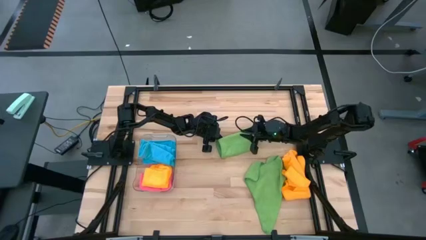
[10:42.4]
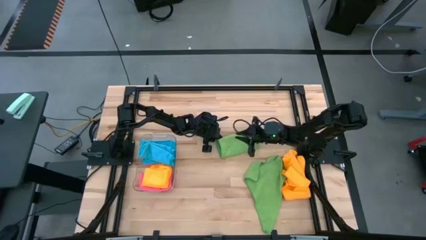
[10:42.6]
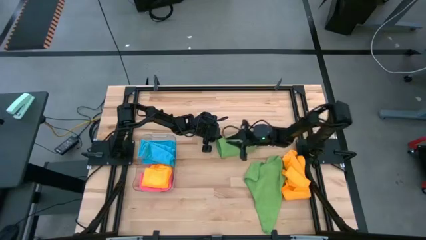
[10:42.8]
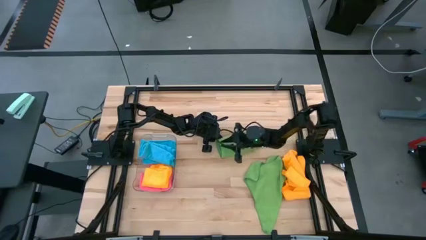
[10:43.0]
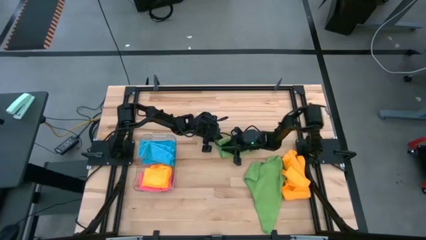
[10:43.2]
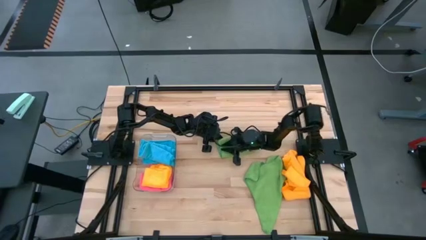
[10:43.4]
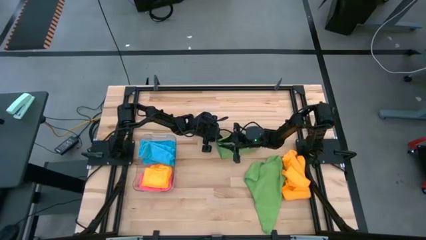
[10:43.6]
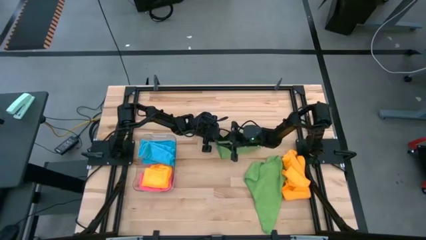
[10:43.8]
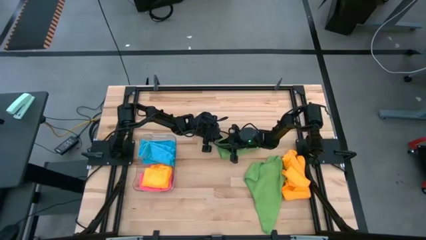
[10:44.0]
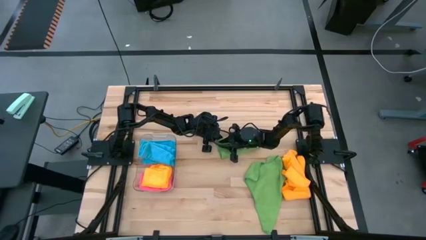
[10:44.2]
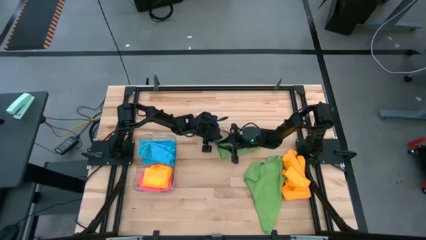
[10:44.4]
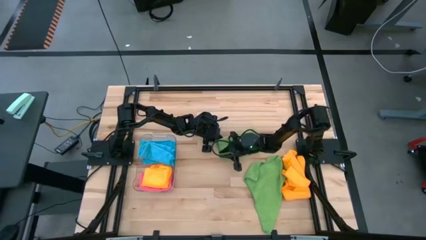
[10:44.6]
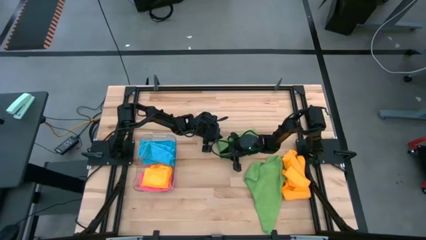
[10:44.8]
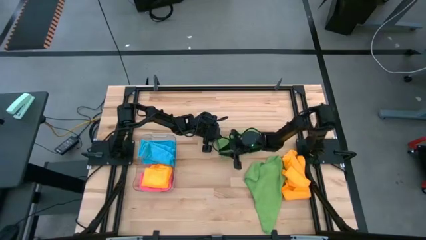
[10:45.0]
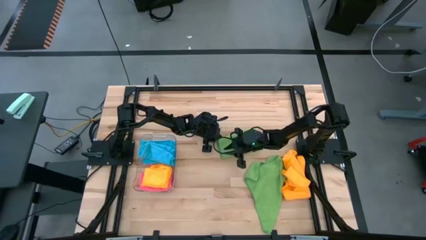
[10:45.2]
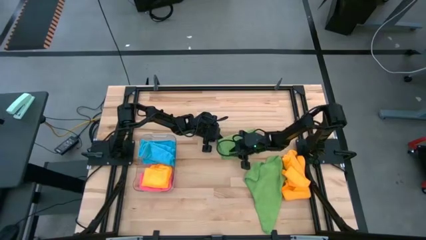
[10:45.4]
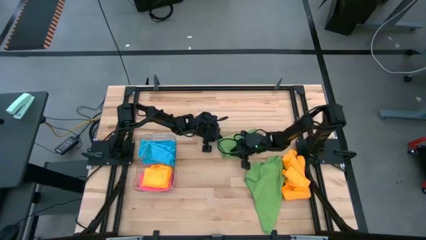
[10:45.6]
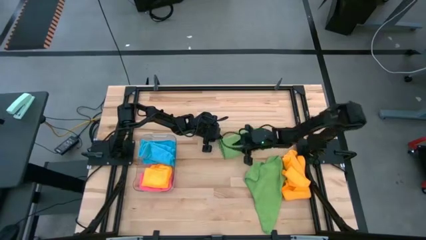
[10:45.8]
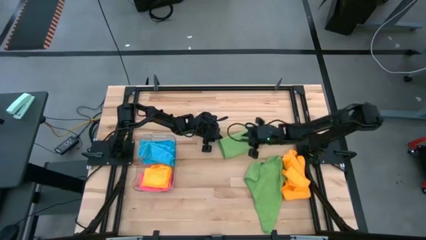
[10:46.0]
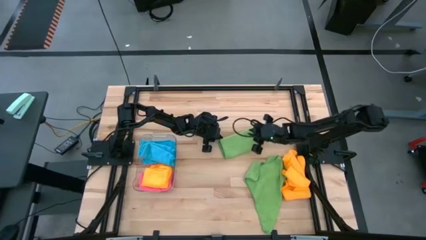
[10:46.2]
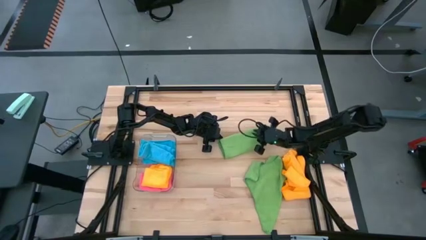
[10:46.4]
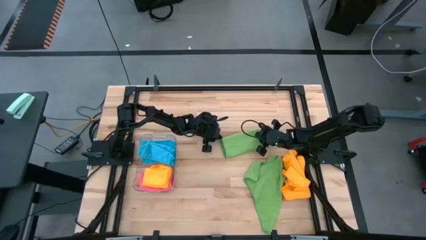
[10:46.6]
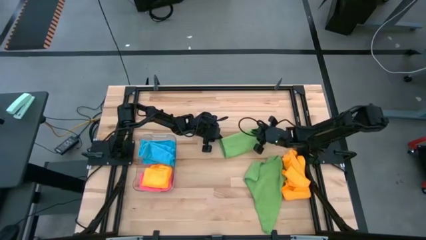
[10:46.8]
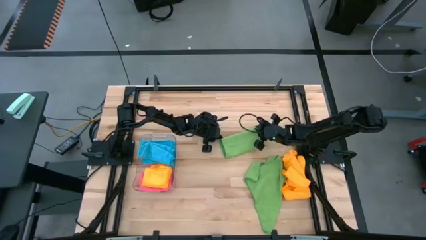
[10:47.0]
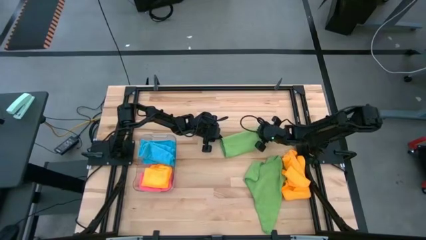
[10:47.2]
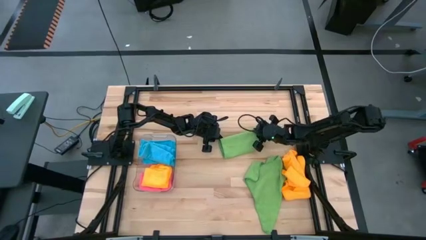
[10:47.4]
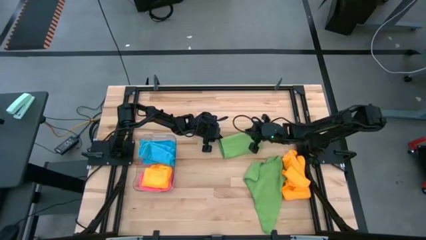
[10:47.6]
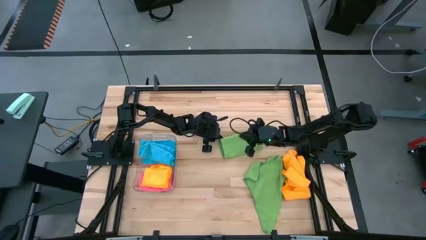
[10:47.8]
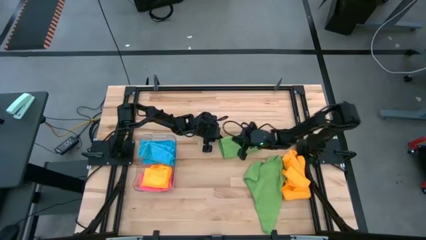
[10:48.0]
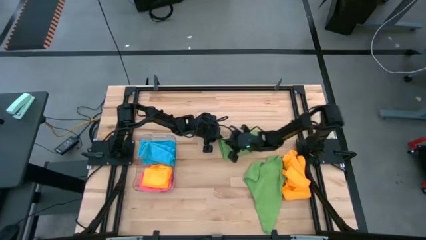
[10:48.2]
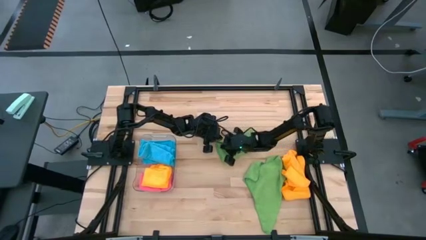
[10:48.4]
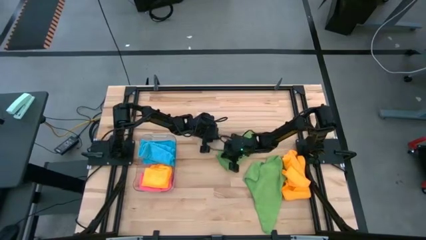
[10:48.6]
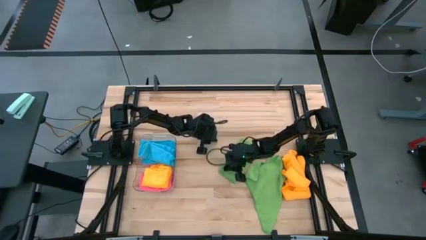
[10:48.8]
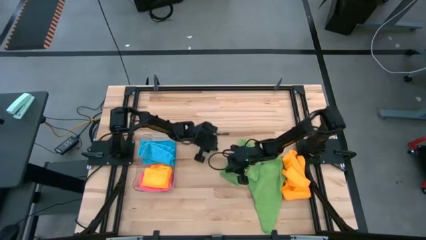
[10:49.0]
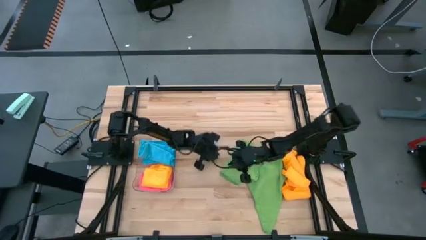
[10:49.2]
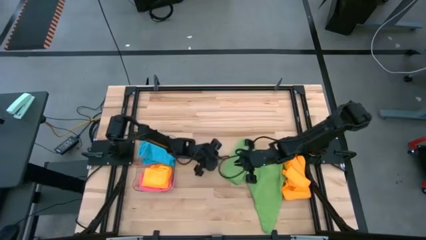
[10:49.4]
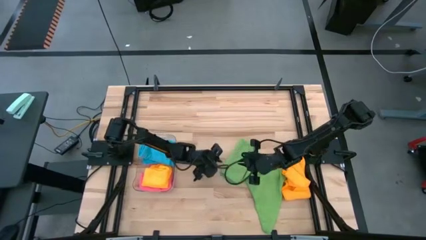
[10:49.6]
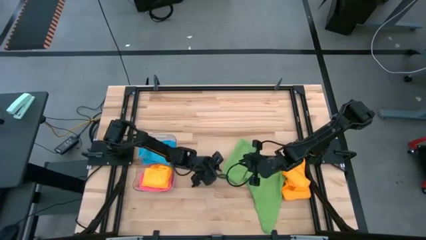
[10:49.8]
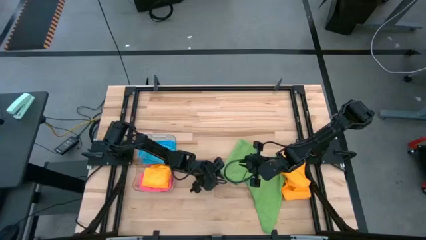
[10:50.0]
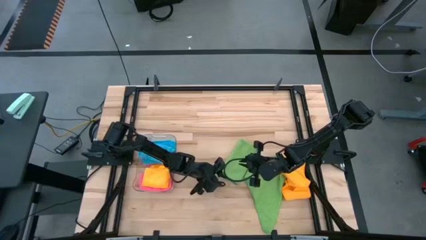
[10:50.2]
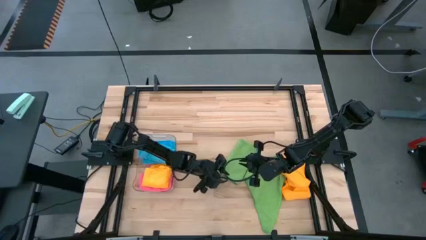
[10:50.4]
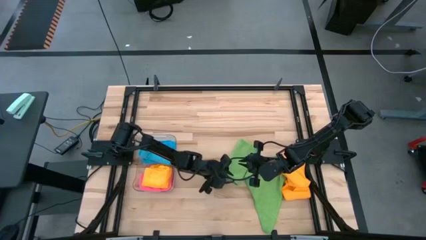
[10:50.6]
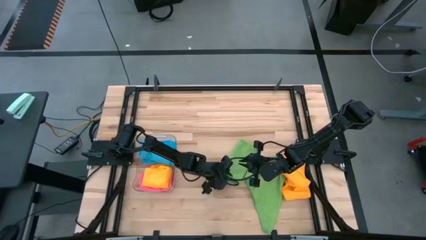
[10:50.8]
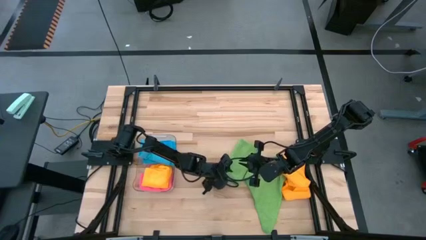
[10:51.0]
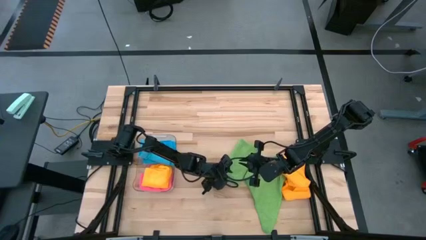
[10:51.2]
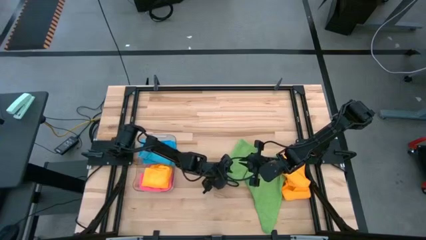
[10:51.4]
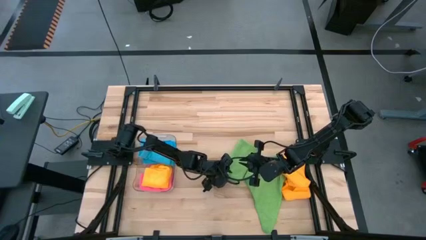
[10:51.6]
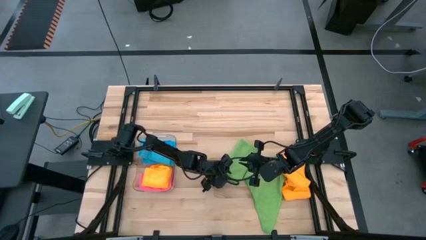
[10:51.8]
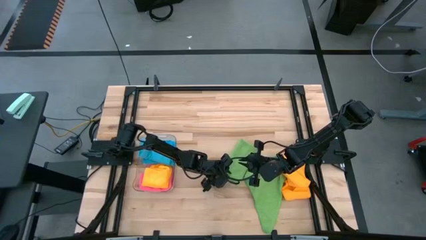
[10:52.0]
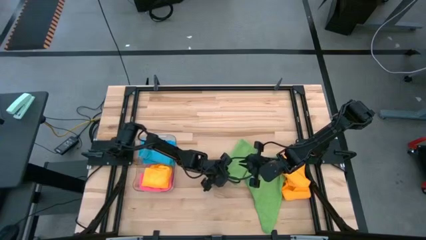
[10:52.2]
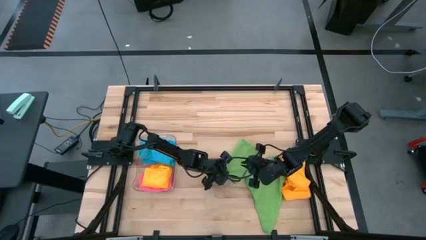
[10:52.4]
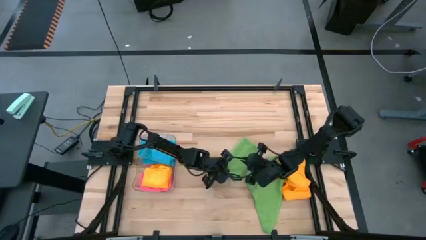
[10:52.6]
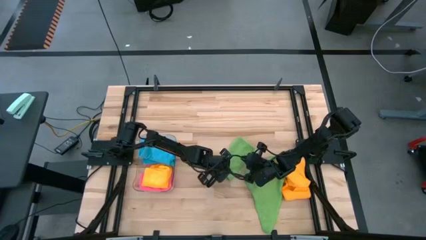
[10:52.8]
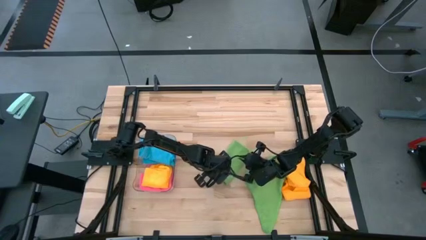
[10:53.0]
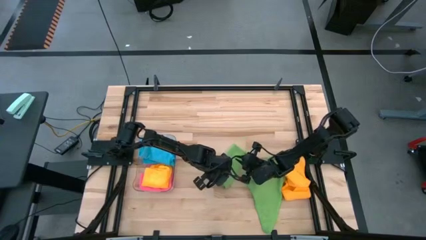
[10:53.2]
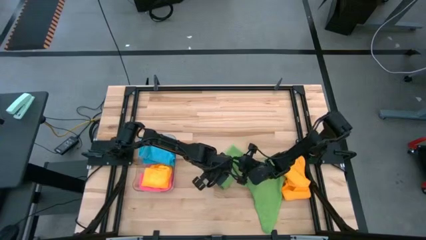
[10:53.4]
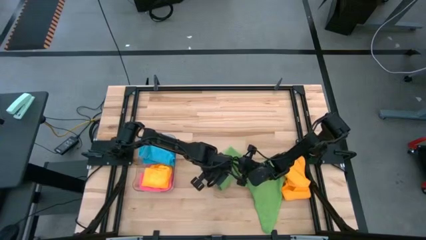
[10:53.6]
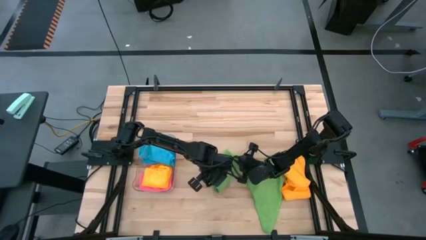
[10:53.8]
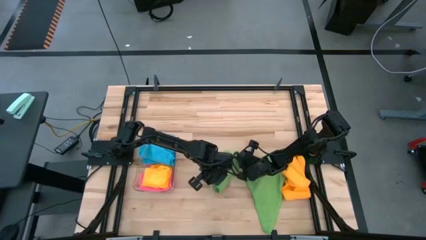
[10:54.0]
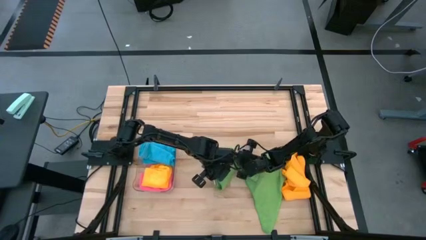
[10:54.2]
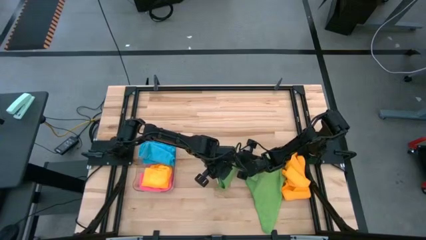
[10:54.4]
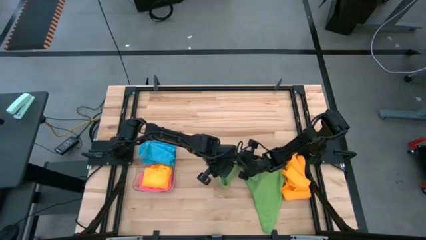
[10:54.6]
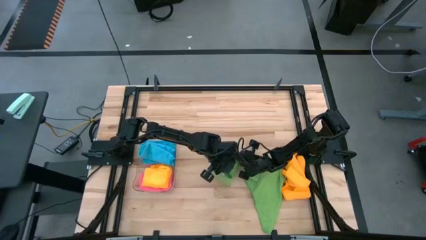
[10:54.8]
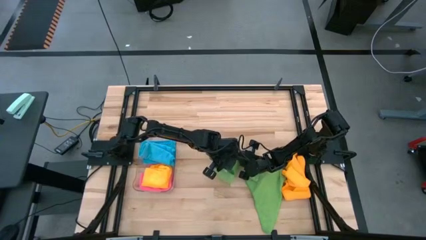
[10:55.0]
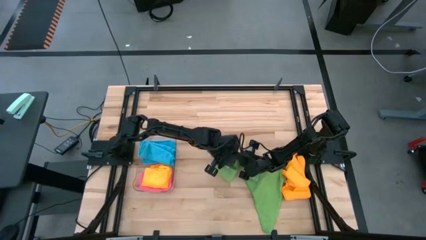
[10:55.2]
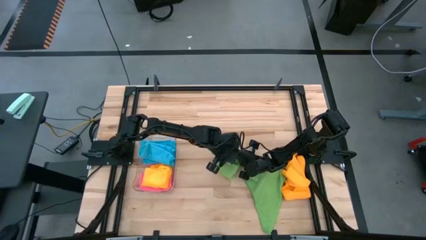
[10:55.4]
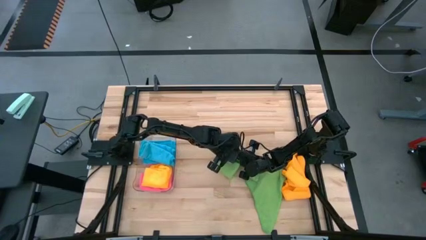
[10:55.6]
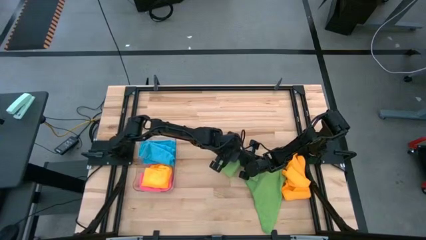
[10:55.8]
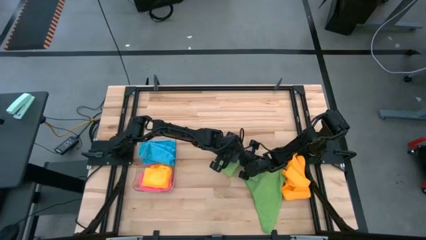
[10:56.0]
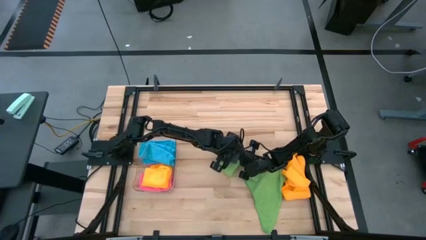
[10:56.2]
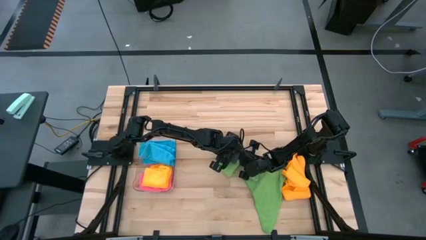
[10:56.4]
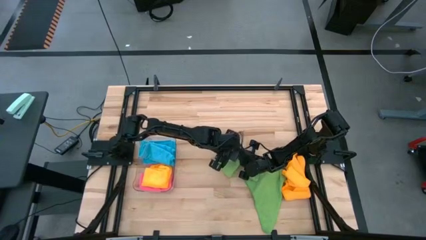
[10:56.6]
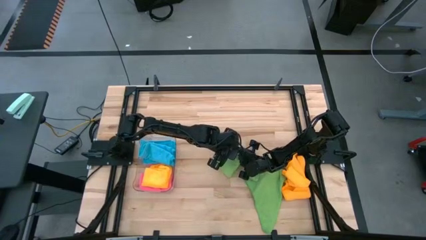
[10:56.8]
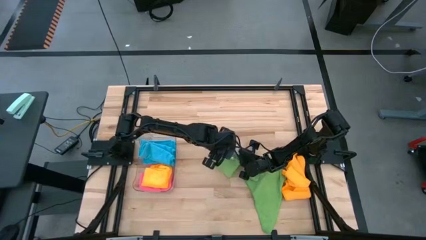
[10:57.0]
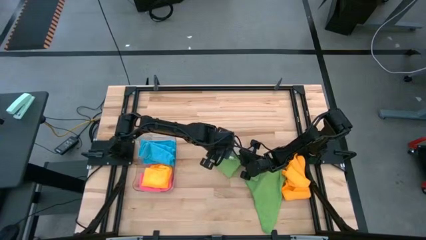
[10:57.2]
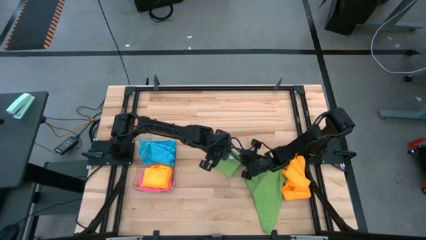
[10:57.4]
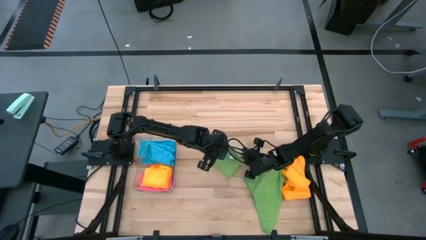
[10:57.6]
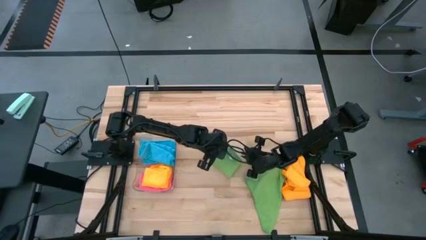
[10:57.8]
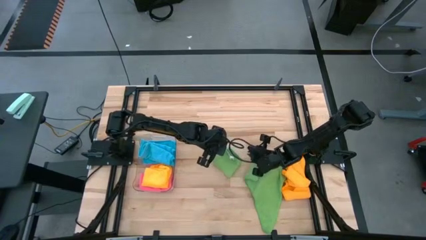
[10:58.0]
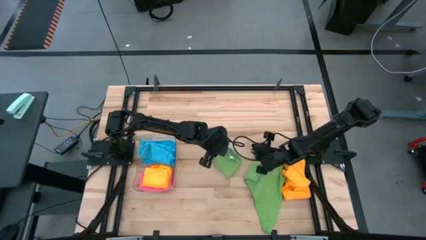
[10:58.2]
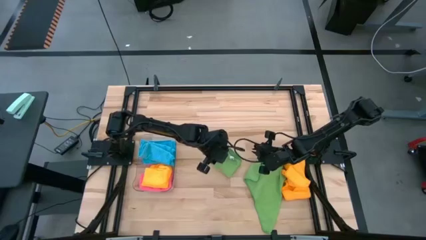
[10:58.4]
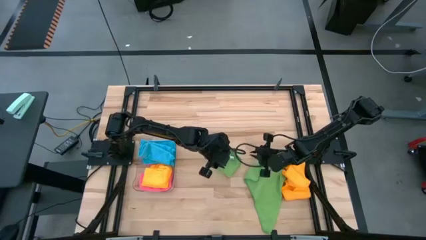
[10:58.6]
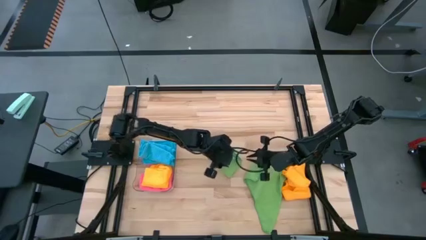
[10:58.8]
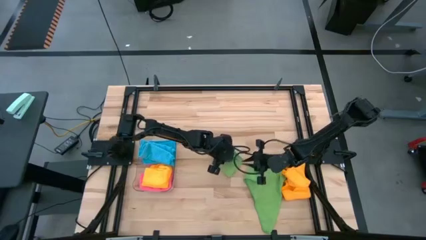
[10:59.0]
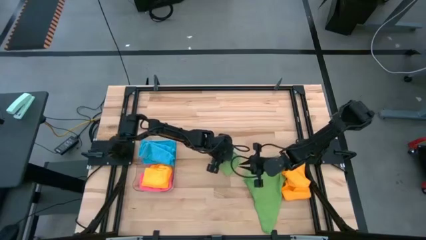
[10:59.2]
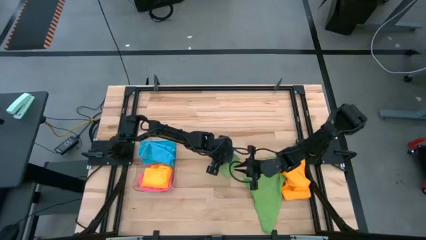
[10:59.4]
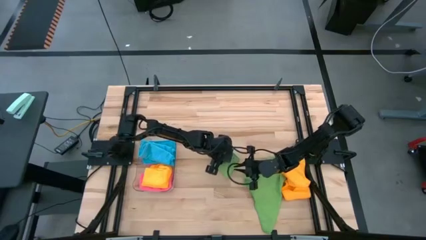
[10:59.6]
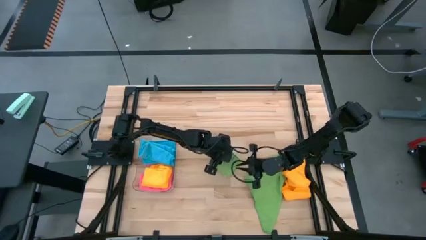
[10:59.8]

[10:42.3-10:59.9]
Task: Fold microfiber towels
Fold the left green microfiber cloth
